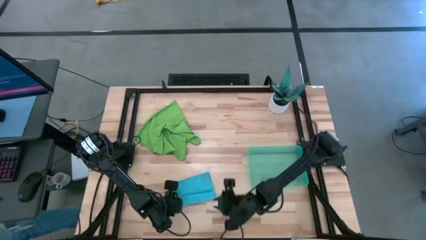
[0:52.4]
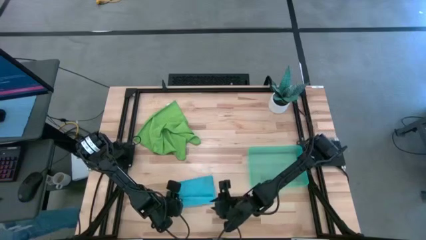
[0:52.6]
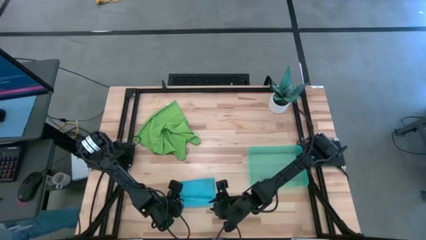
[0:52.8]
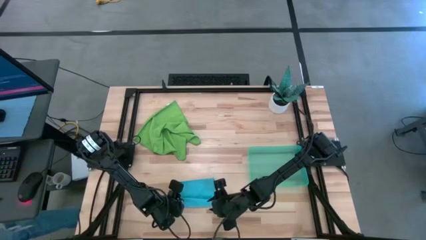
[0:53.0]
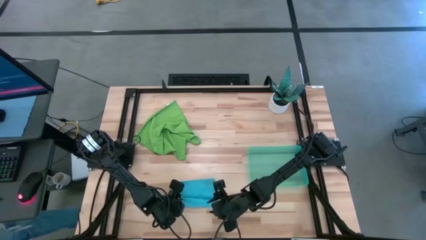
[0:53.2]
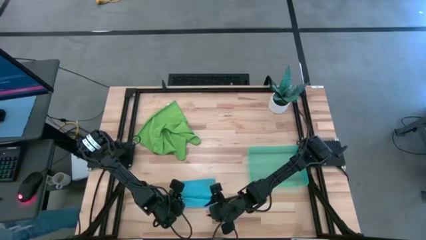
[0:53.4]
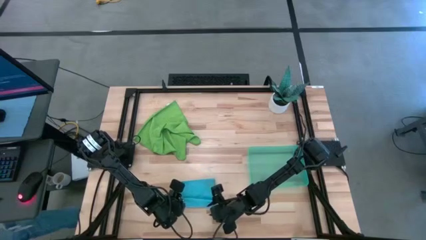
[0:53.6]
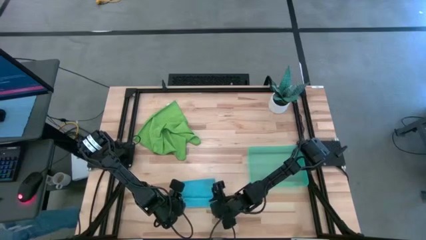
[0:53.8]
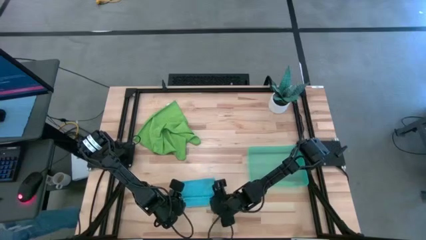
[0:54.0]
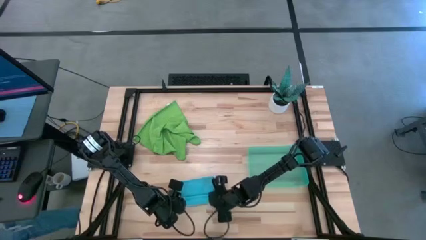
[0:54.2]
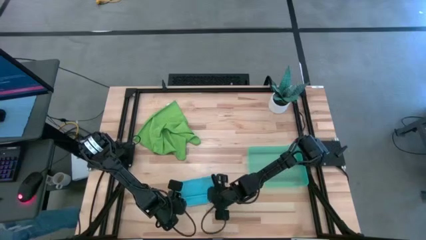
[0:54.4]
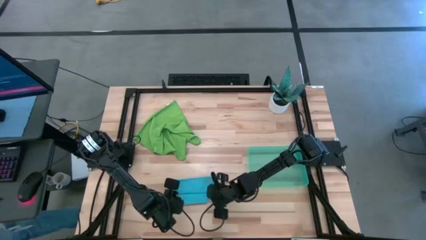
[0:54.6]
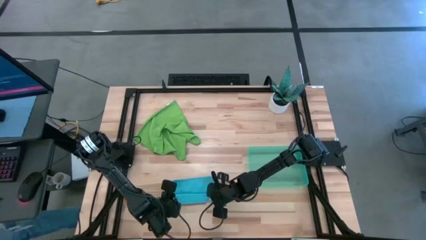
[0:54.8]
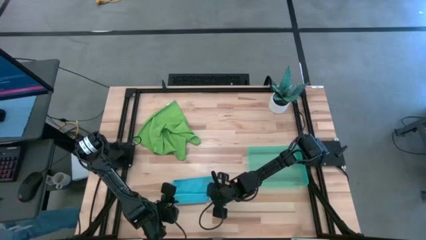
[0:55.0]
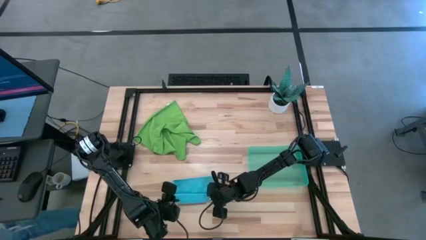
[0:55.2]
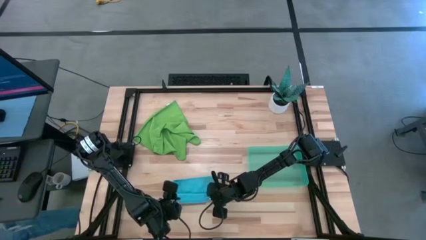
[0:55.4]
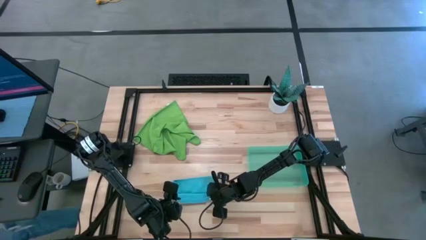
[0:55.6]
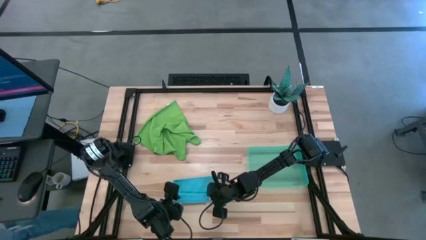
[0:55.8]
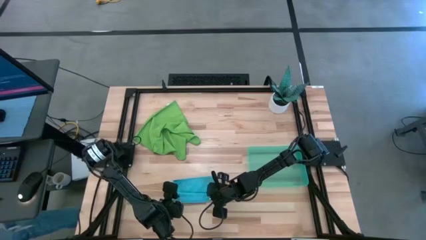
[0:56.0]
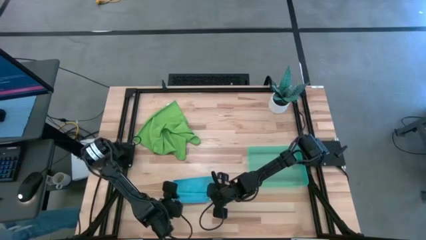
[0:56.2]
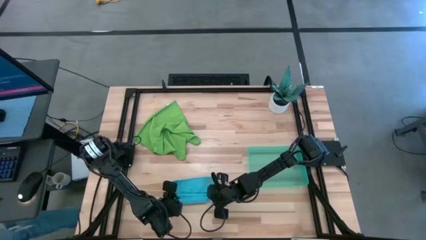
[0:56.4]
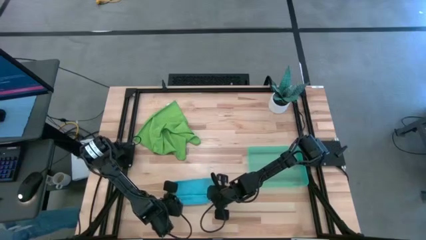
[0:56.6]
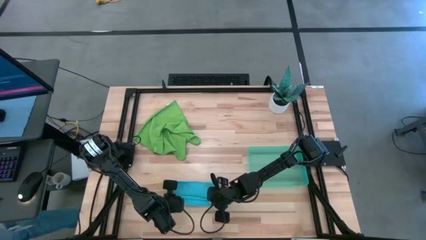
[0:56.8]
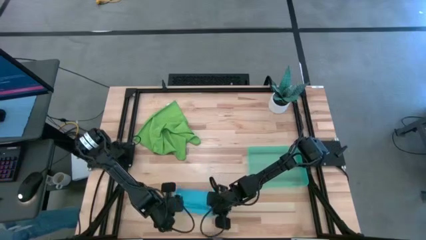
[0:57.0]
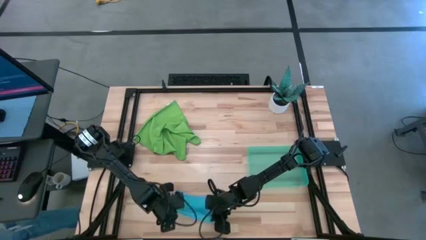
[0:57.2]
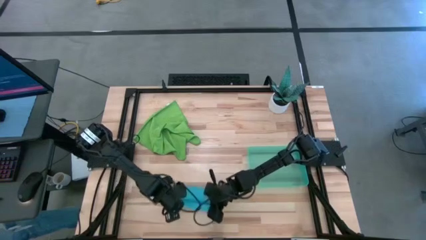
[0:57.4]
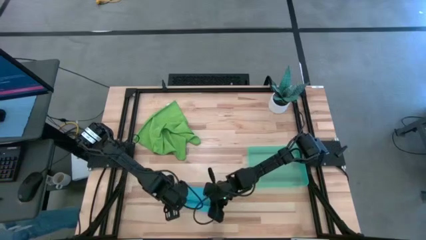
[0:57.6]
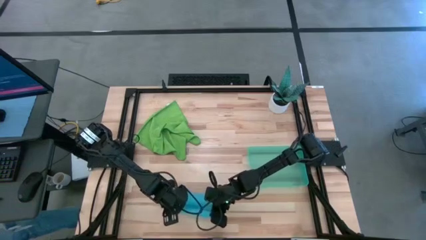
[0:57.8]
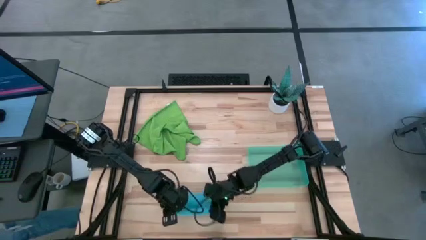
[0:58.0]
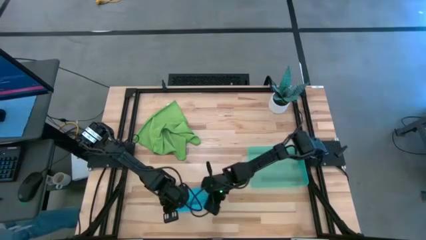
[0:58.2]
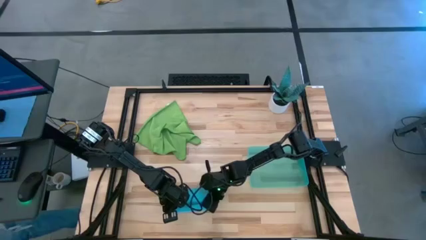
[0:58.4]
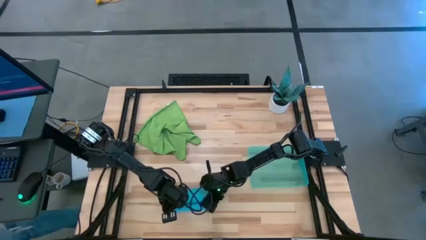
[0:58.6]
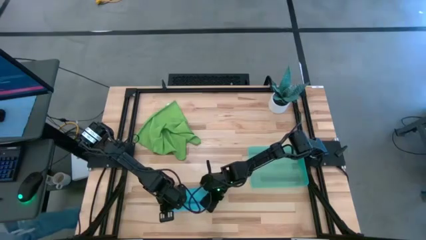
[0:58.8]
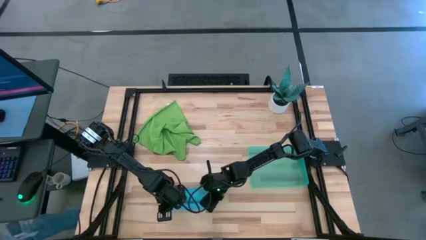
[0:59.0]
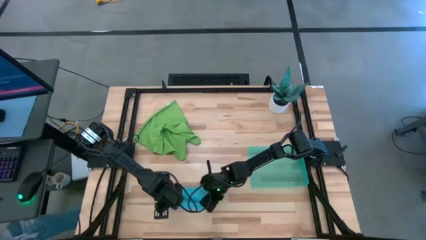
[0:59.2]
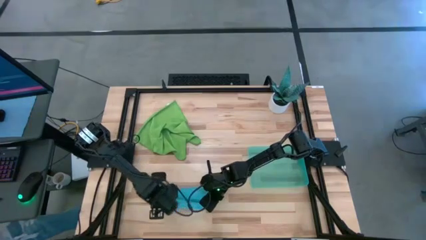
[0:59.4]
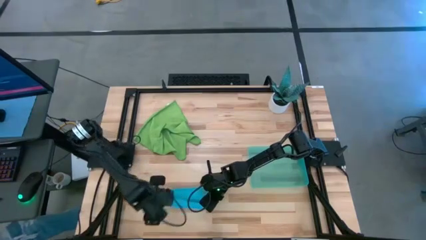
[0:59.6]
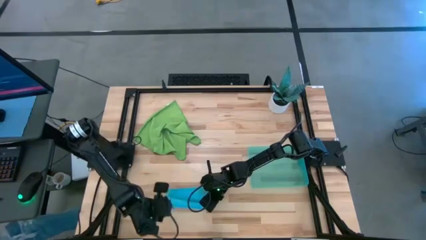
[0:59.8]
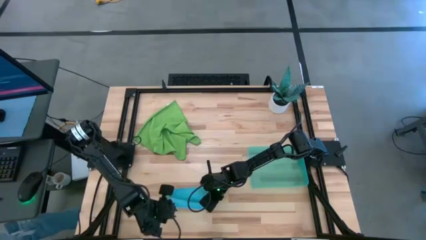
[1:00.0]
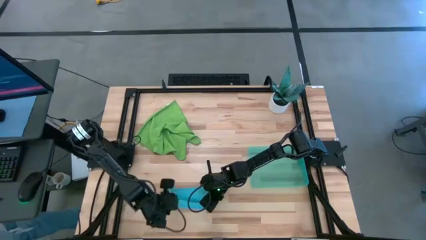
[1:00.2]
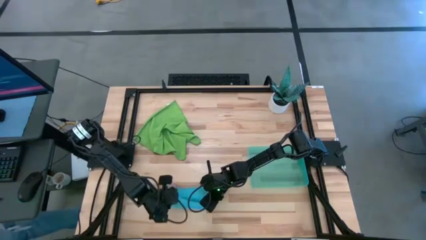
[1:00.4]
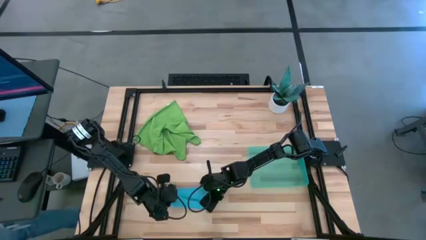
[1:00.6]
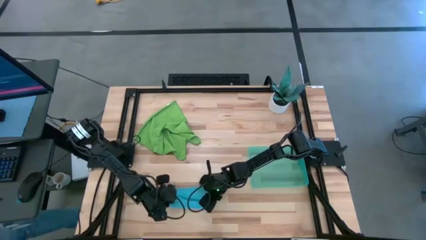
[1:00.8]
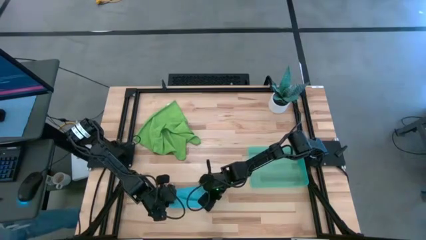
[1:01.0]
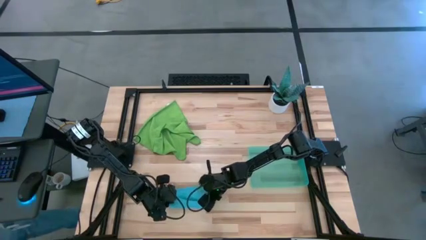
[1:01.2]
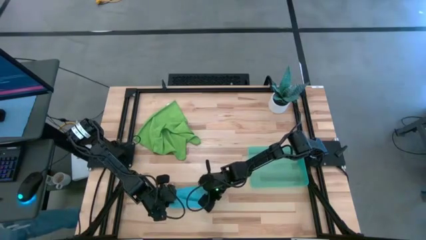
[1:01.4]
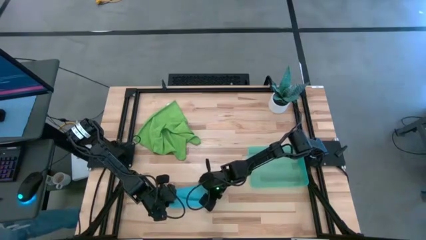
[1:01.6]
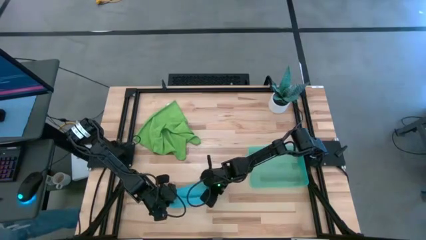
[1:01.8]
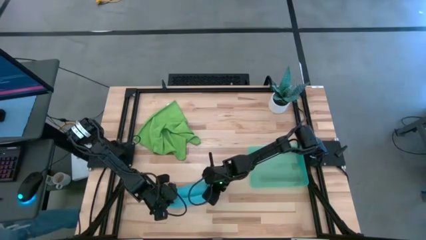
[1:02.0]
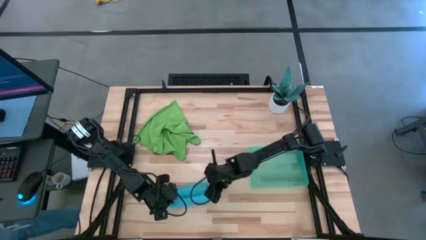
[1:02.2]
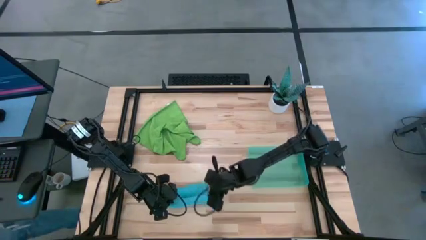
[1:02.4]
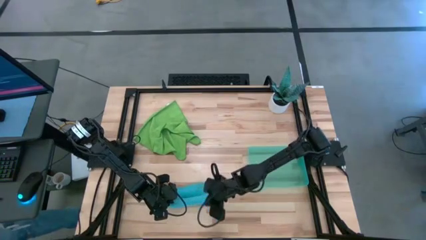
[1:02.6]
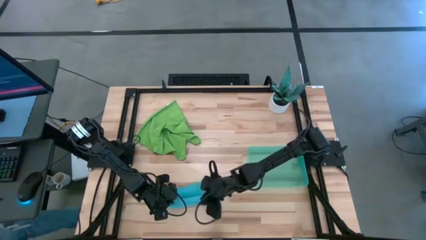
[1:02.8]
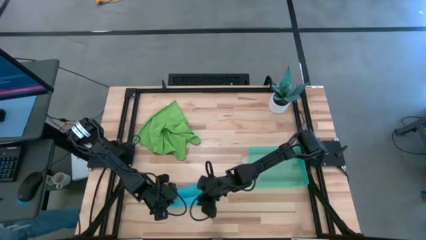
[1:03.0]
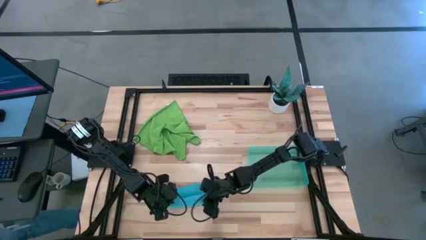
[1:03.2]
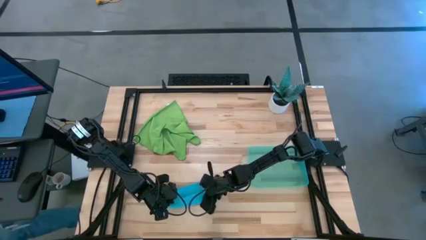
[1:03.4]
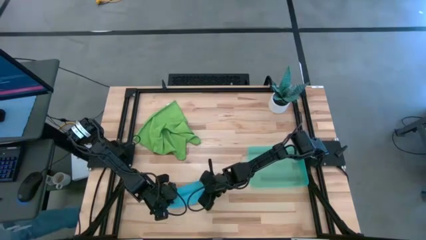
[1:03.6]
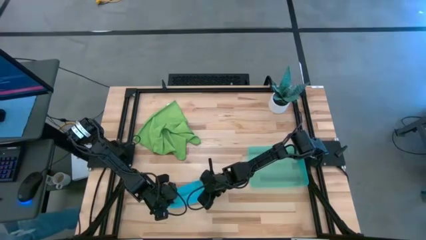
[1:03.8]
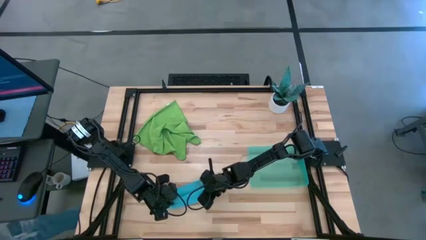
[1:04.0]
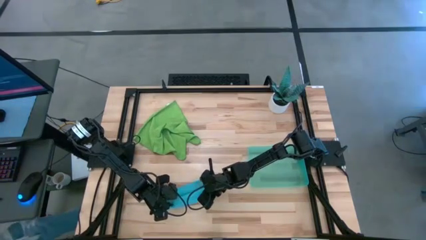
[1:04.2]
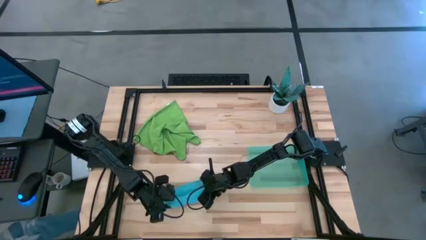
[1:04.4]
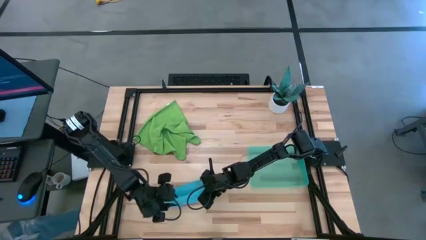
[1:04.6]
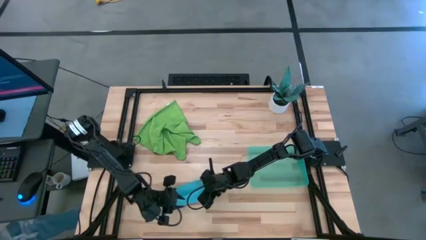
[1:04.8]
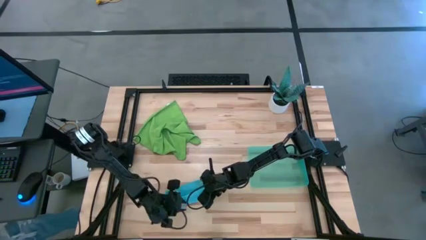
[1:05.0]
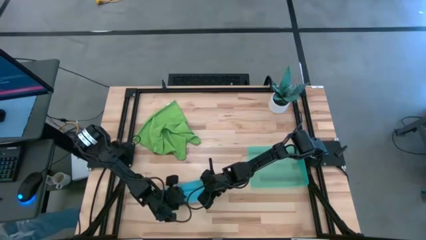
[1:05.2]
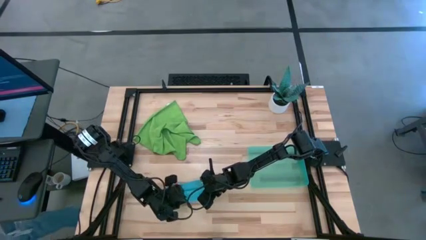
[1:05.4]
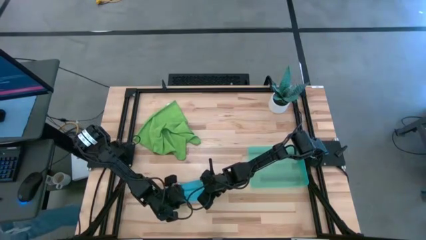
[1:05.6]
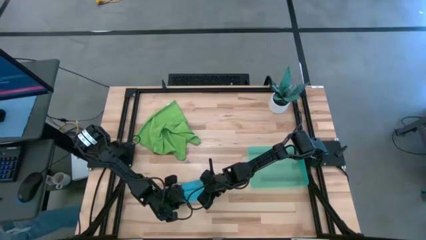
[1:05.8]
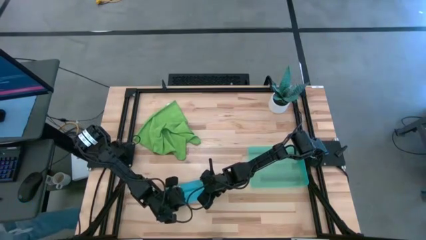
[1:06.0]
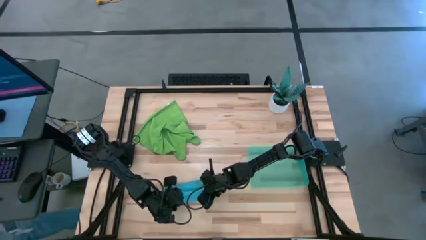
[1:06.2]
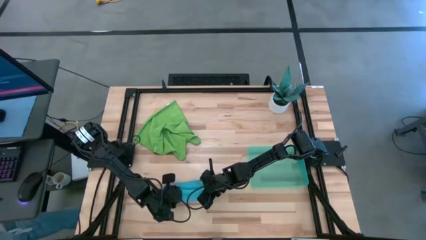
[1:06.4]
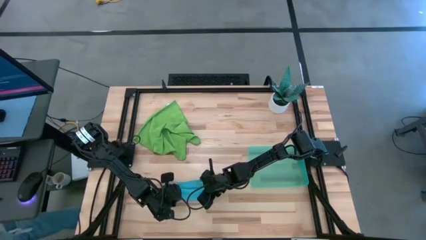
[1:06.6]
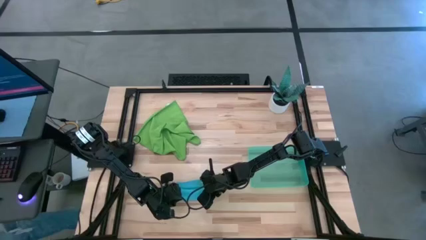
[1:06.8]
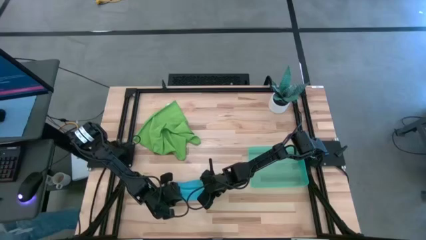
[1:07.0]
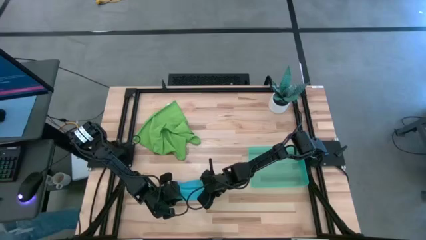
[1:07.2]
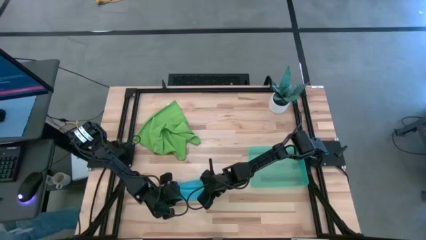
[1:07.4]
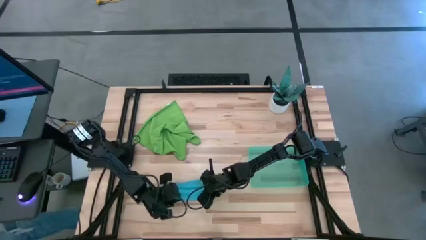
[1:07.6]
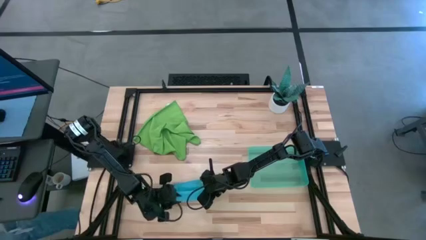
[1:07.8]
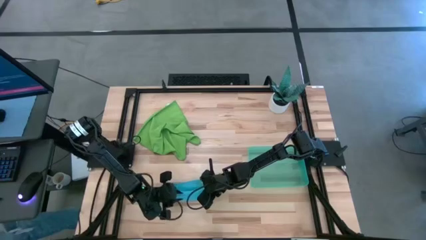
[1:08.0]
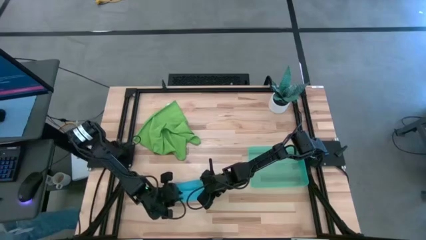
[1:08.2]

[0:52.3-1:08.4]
Task: Roll microfiber towels into tight, uniform cylinder then place into a basket
Roll the blue microfiber towel

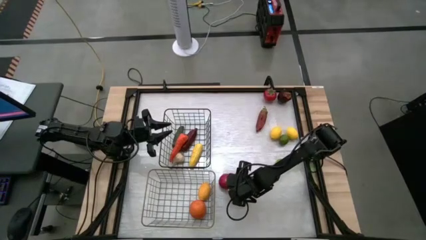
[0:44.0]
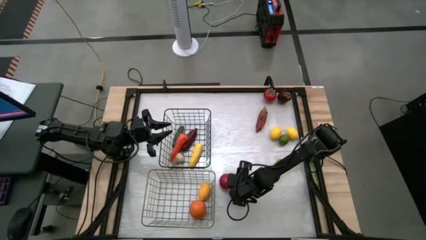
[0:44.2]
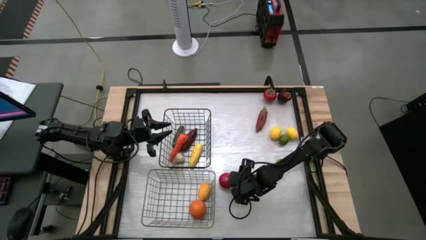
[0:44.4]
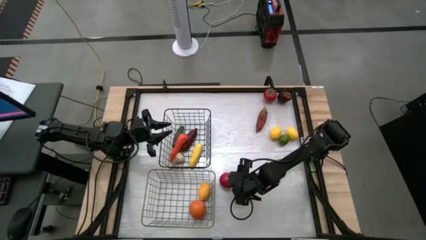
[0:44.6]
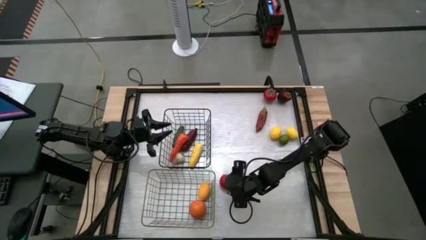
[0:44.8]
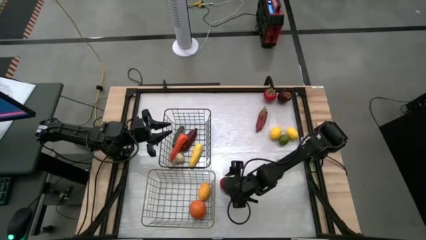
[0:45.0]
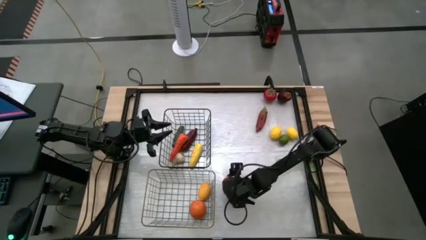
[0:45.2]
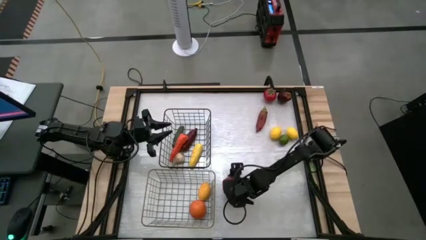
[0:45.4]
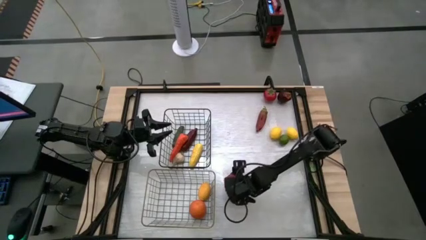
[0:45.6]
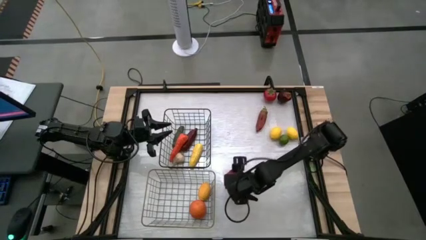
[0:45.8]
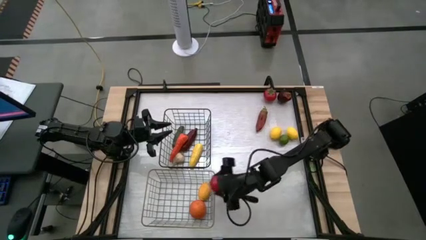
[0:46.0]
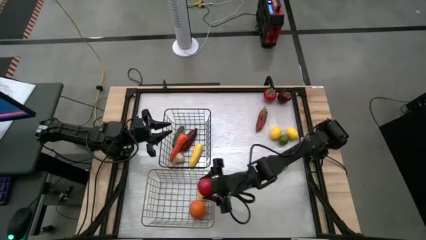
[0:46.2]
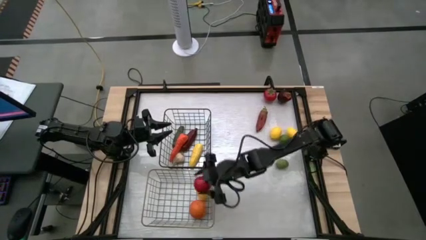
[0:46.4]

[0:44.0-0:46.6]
Task: Sort produce into baskets
Put the bottom tomato into the wire basket
